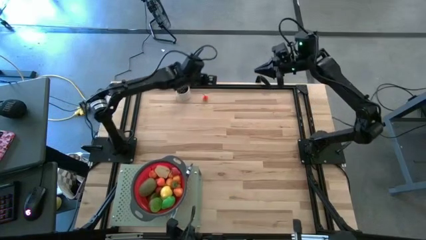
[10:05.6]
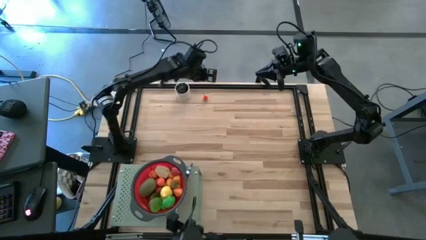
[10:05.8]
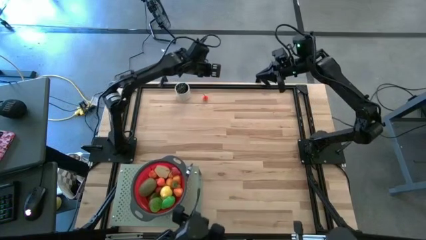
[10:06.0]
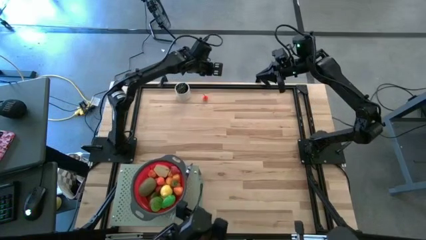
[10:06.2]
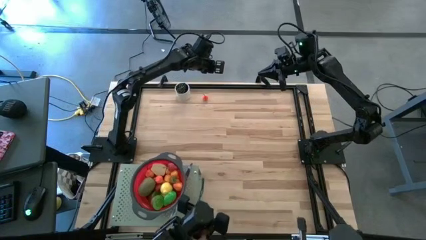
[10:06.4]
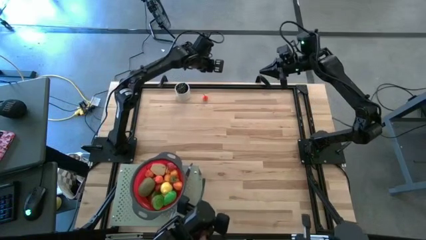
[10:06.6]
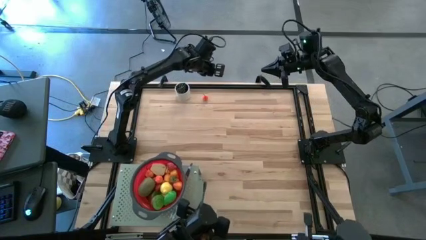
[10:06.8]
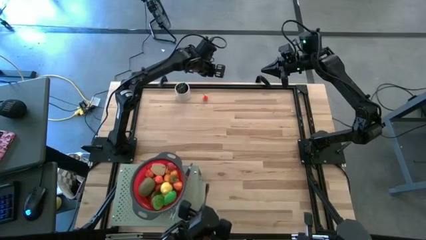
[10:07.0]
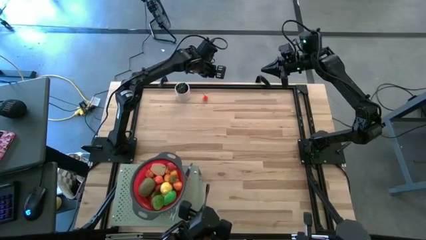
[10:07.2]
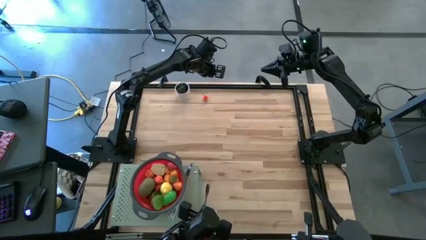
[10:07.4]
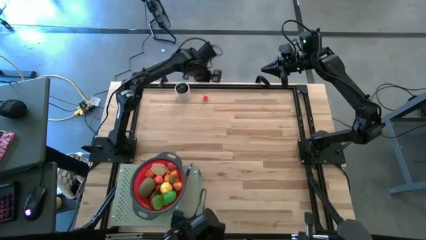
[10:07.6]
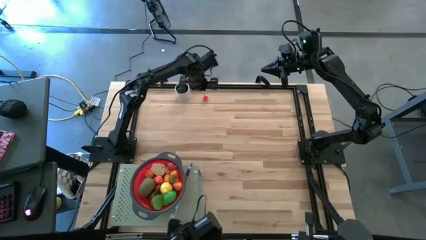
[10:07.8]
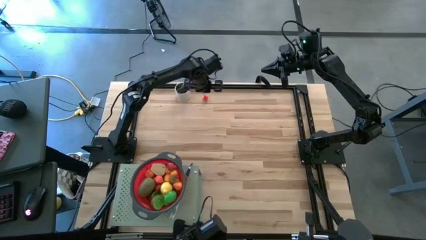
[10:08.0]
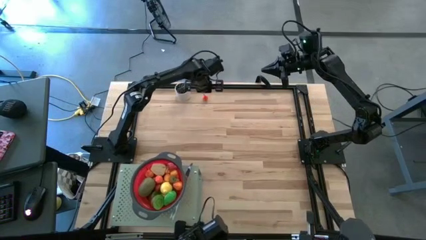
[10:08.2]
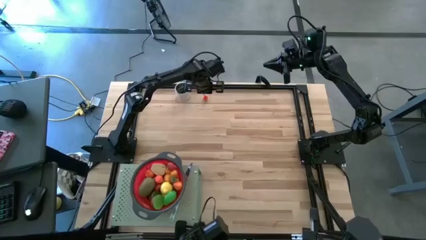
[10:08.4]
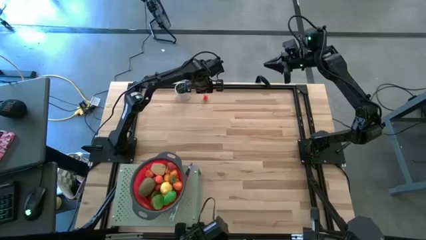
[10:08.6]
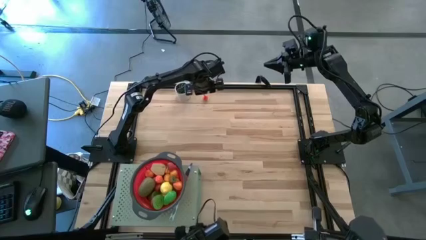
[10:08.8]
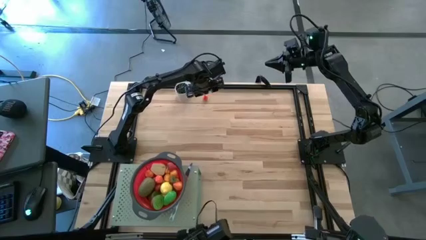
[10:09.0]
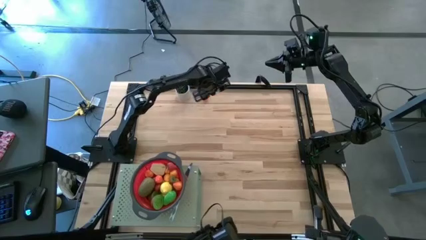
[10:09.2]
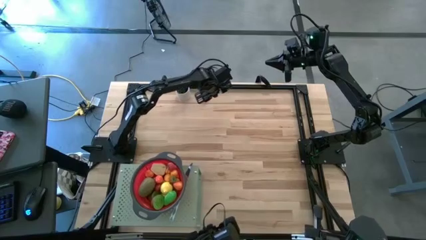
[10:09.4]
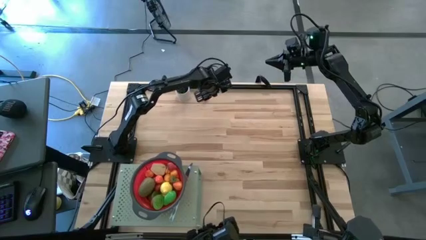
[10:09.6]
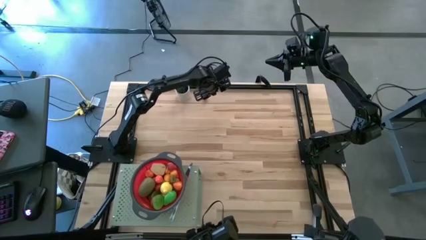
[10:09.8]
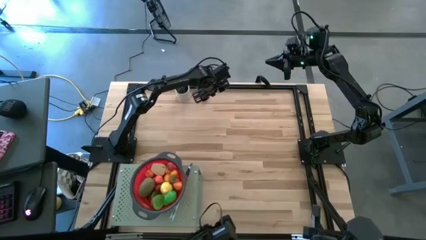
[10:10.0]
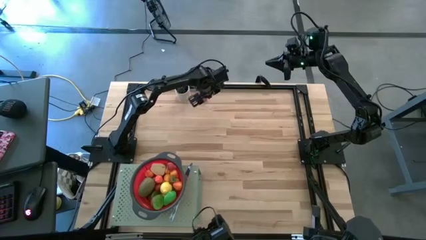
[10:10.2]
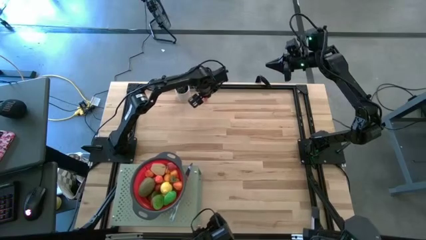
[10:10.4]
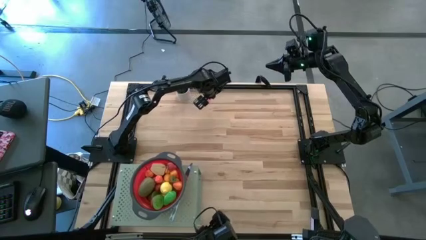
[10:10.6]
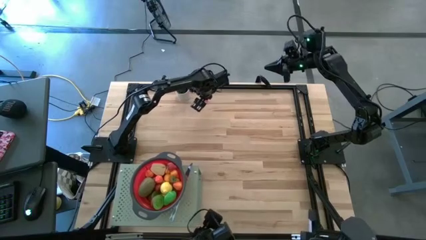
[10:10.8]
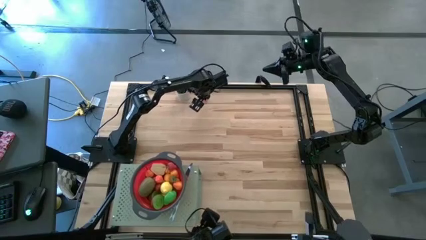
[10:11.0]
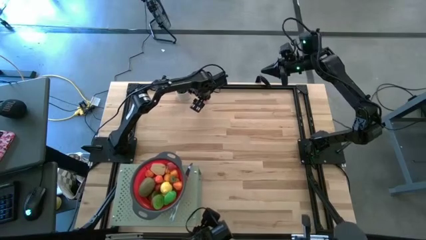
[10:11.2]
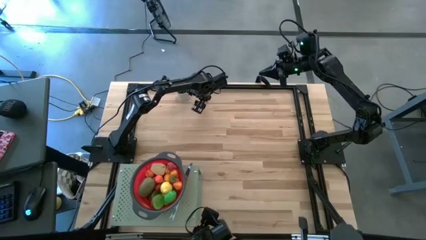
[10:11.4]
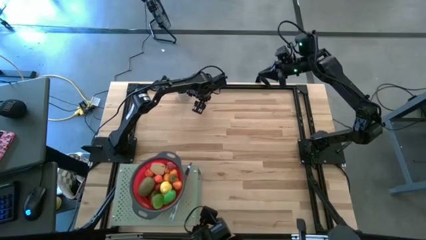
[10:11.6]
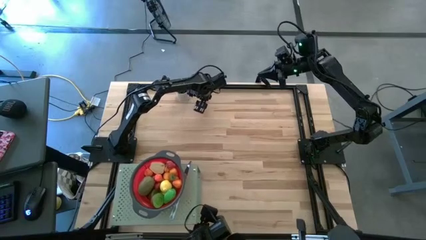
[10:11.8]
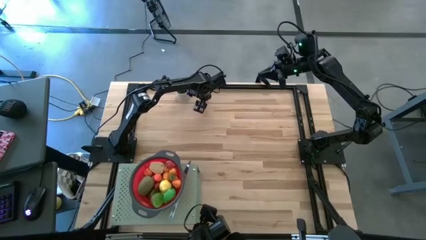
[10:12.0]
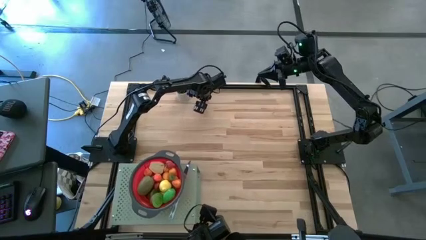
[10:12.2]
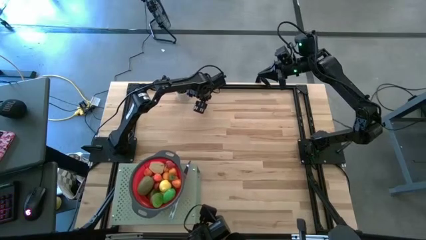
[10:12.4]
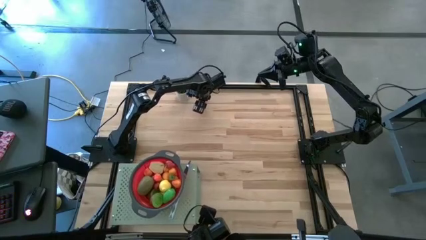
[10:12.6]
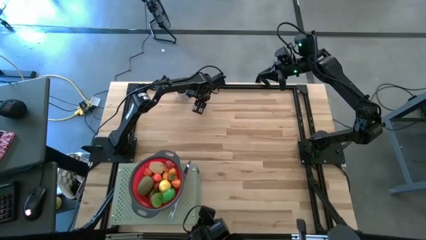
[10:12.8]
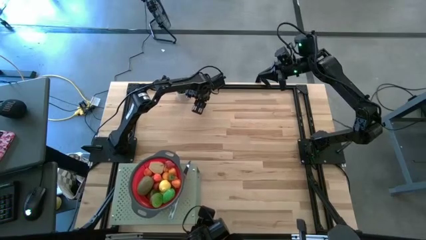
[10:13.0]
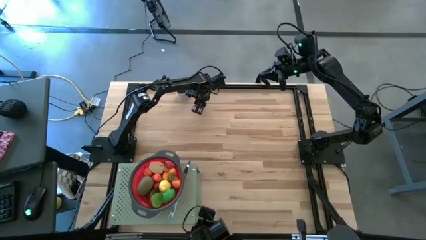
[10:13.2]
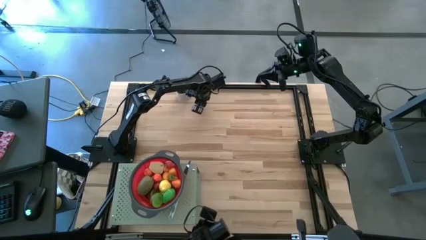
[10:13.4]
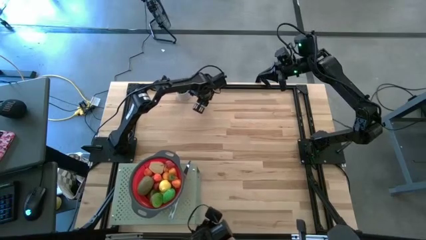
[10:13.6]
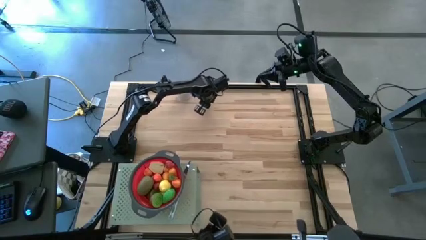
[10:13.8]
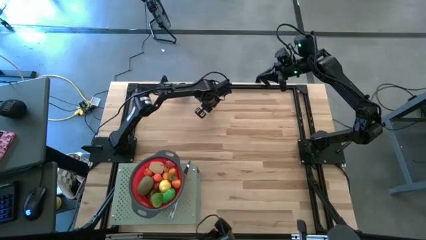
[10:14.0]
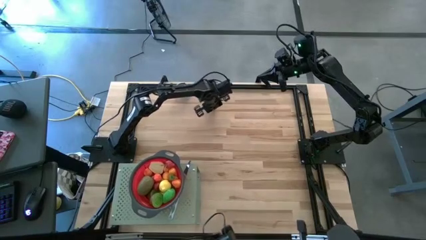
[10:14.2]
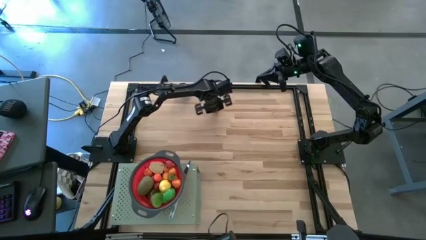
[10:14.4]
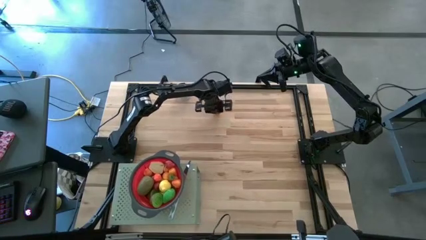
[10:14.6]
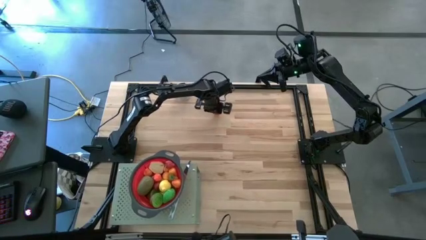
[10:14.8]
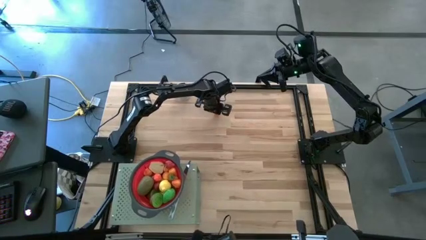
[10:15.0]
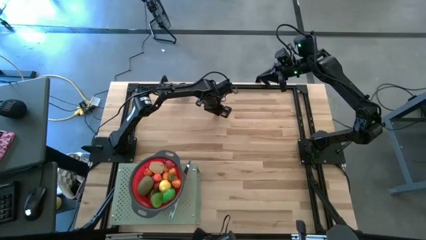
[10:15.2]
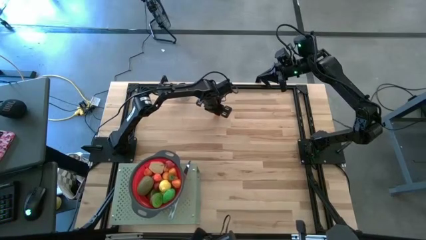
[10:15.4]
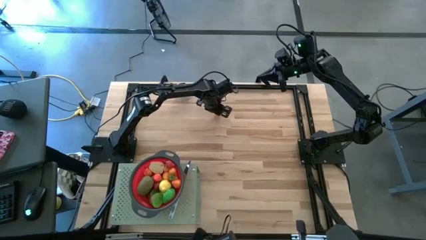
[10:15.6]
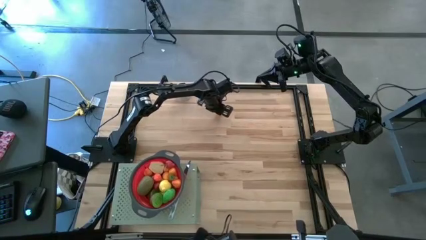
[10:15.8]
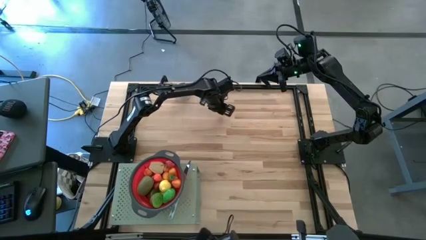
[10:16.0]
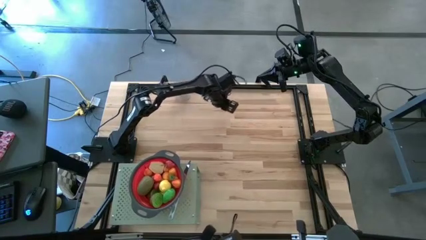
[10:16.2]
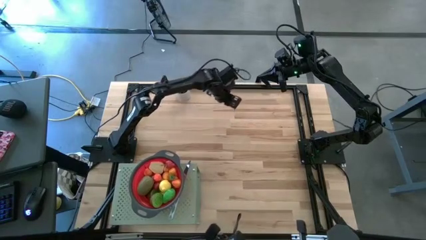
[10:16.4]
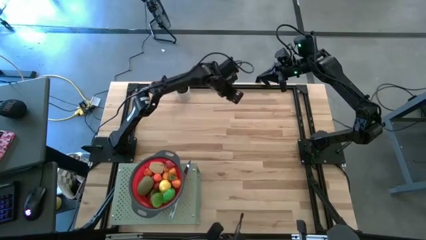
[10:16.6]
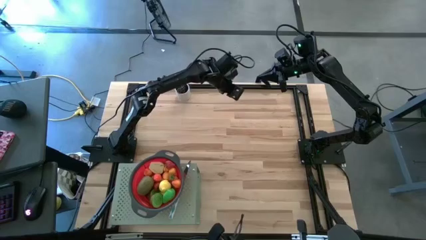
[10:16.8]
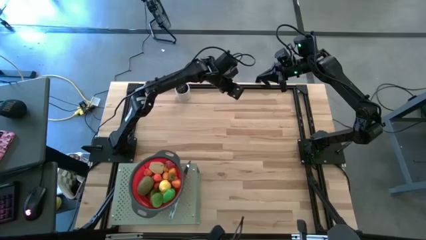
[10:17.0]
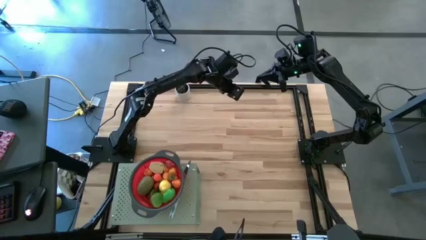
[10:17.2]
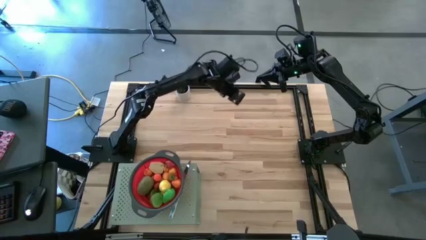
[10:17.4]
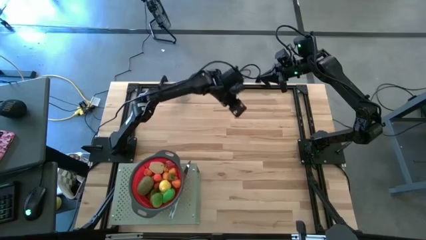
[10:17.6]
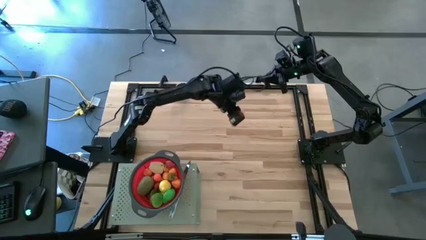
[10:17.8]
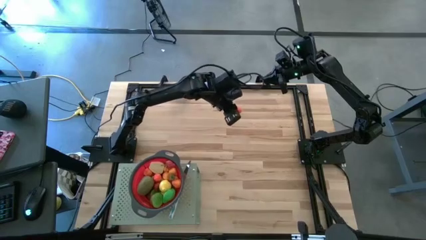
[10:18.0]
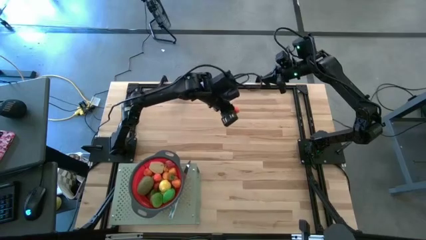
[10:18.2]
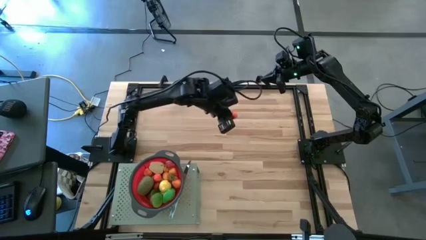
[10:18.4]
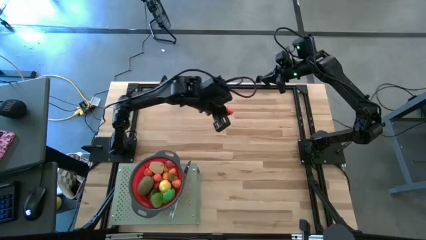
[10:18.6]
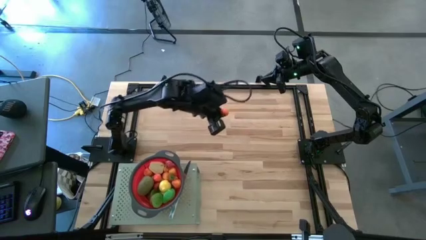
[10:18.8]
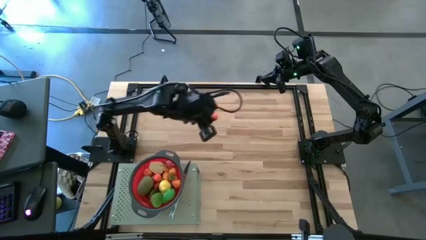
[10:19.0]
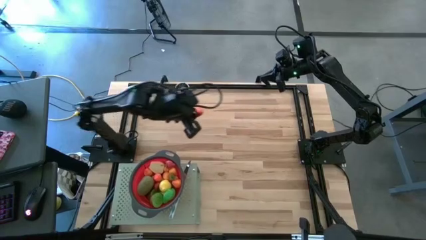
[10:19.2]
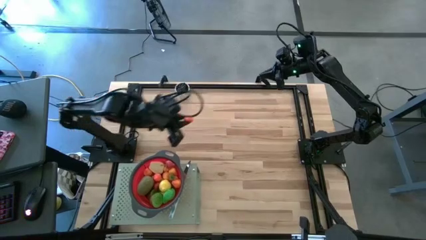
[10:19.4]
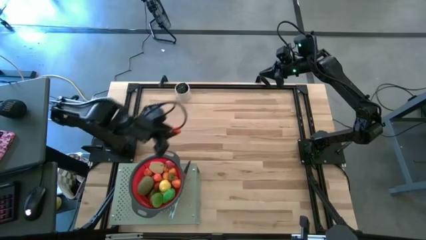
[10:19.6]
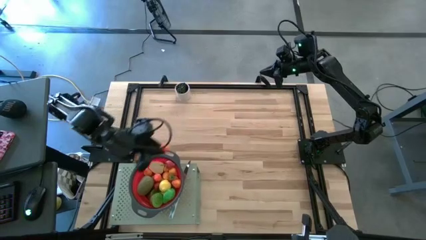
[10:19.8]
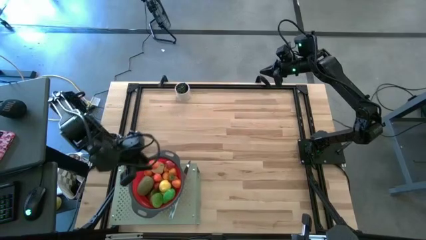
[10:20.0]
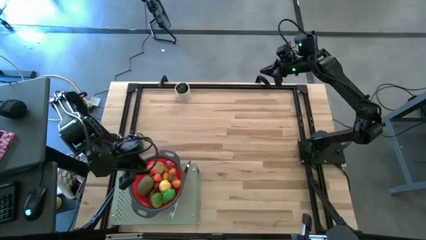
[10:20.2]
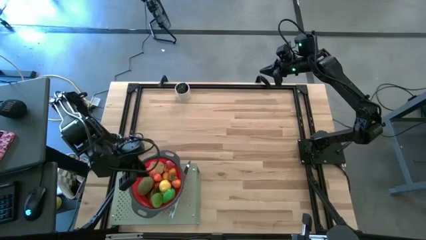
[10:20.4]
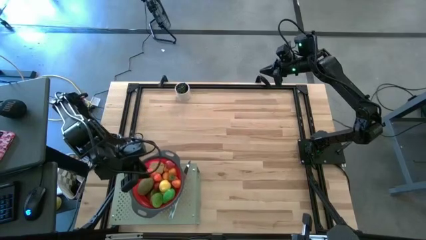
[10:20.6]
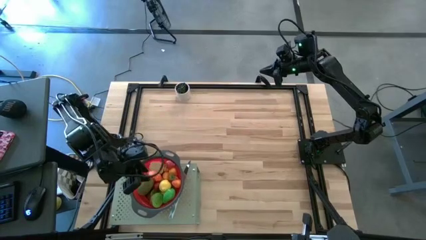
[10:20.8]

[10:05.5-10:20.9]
Task: Pick & Place Fruit
Put the pear into the red strainer bowl on the shelf
